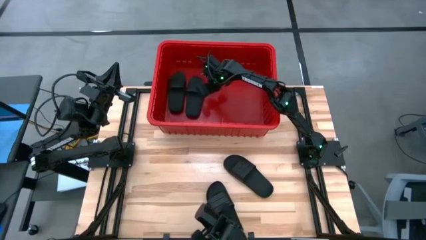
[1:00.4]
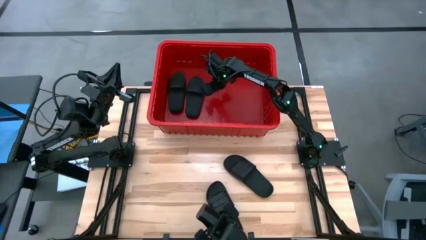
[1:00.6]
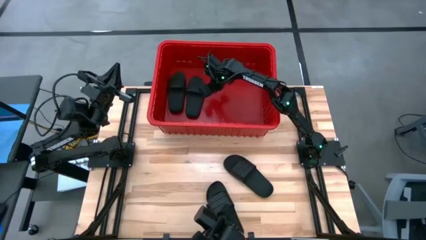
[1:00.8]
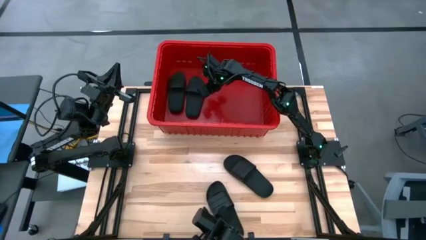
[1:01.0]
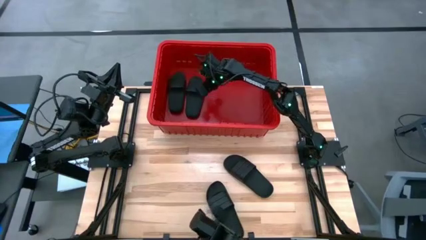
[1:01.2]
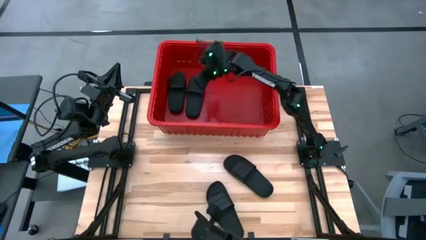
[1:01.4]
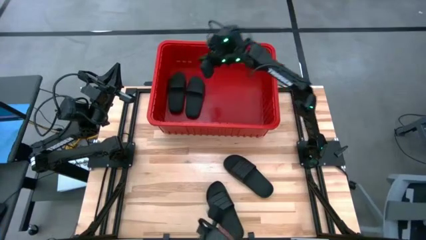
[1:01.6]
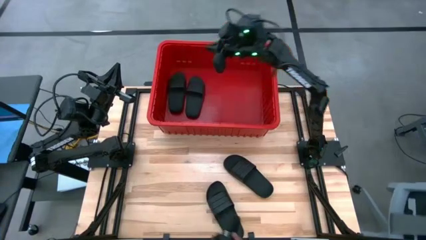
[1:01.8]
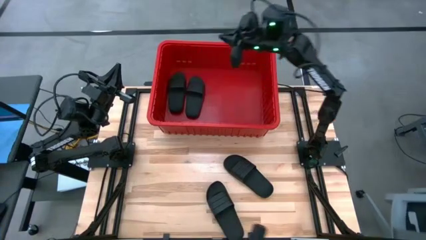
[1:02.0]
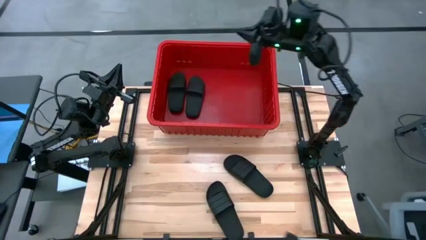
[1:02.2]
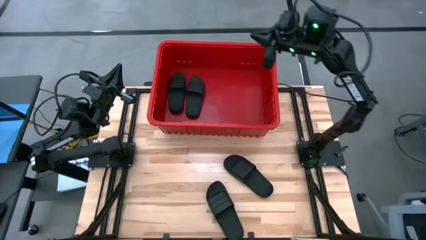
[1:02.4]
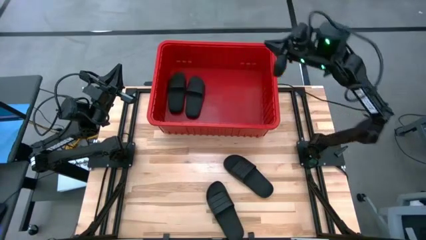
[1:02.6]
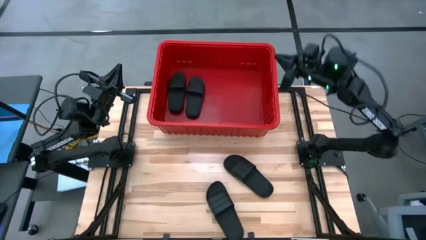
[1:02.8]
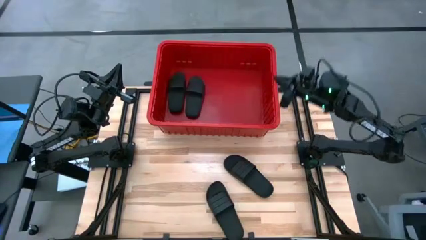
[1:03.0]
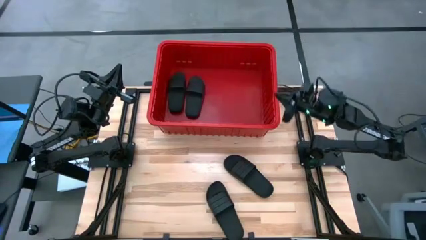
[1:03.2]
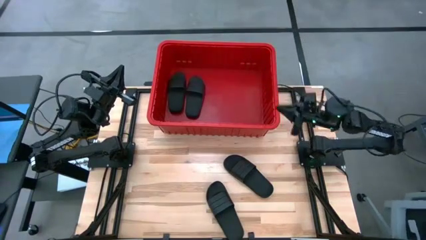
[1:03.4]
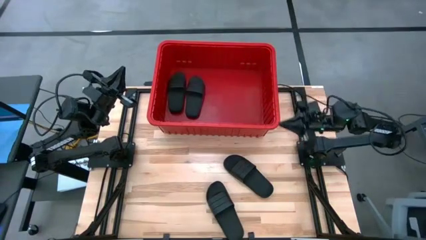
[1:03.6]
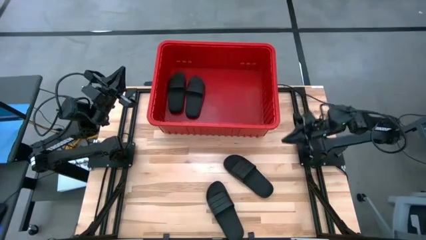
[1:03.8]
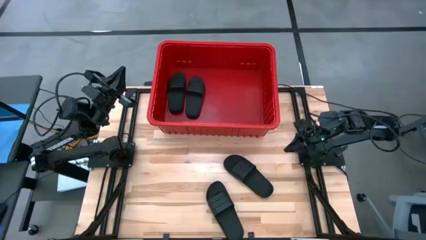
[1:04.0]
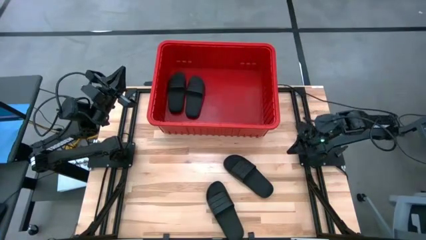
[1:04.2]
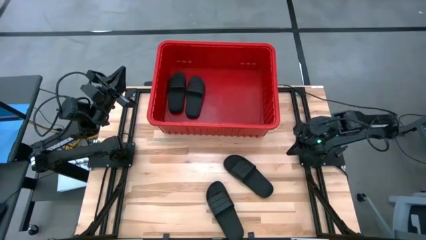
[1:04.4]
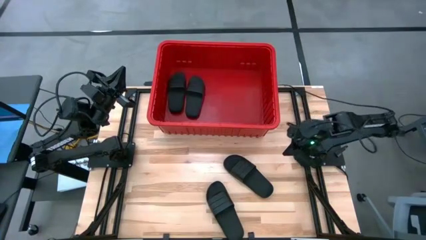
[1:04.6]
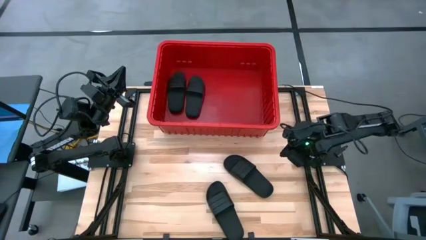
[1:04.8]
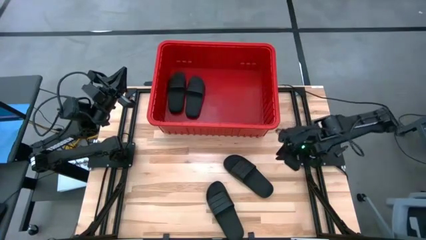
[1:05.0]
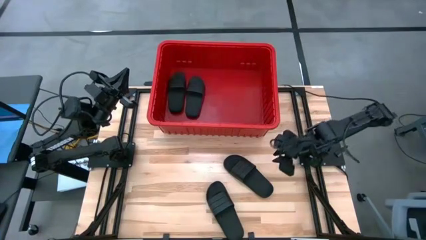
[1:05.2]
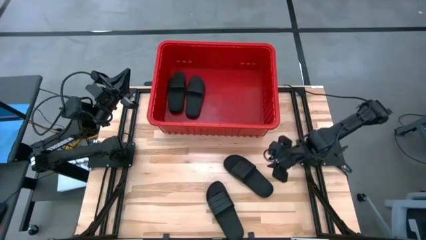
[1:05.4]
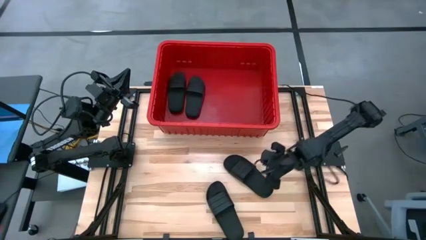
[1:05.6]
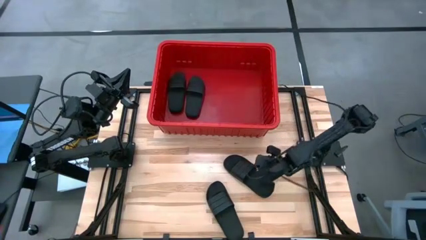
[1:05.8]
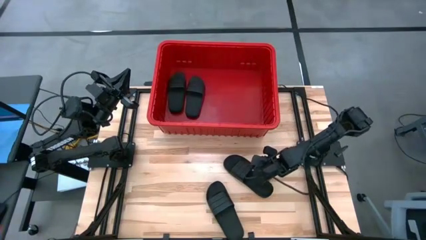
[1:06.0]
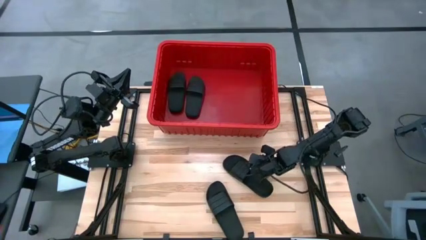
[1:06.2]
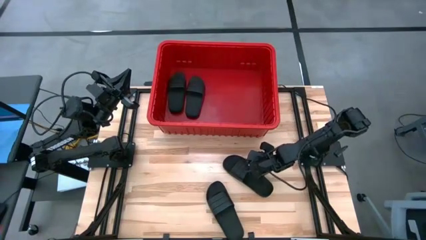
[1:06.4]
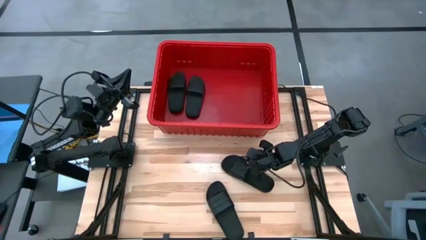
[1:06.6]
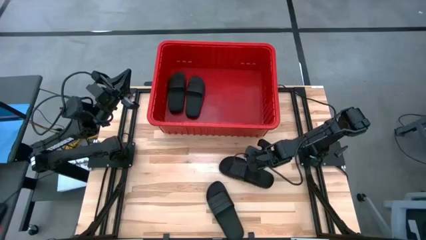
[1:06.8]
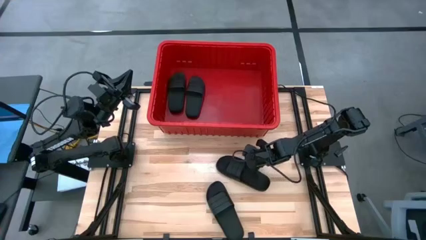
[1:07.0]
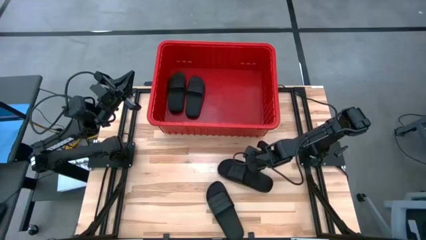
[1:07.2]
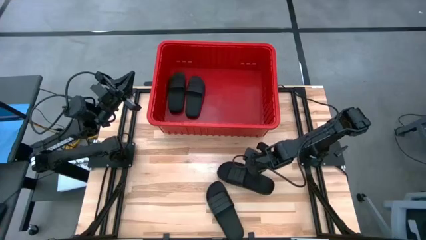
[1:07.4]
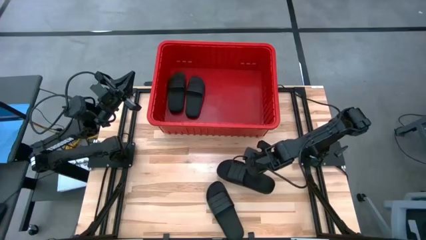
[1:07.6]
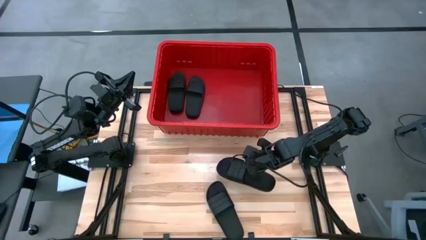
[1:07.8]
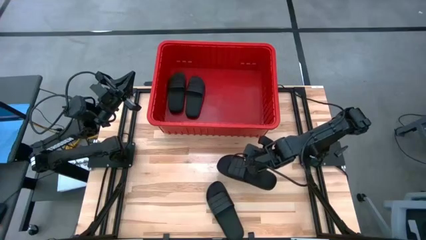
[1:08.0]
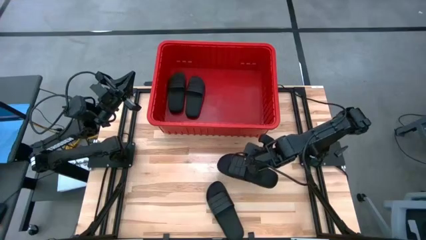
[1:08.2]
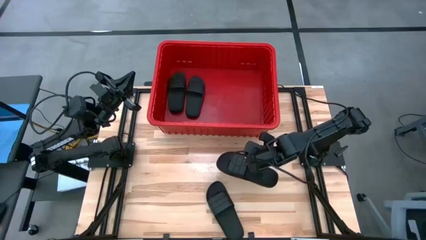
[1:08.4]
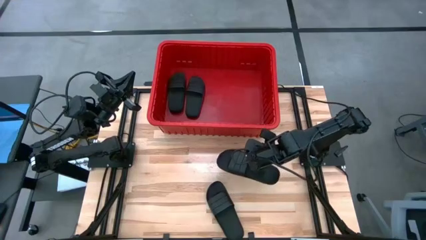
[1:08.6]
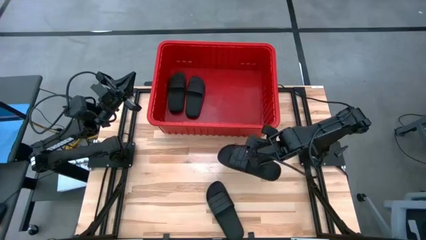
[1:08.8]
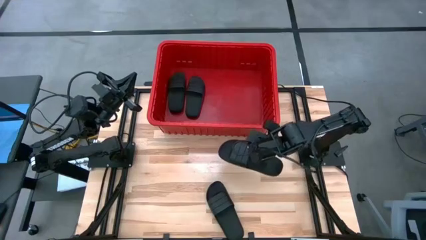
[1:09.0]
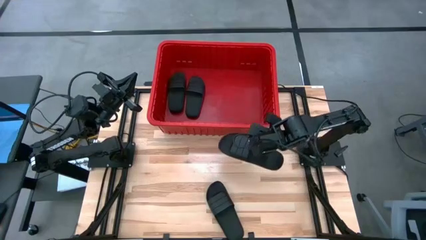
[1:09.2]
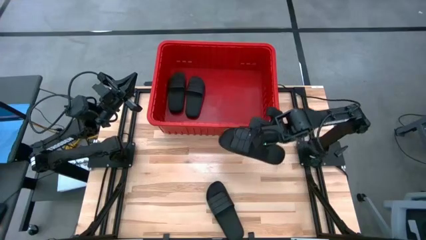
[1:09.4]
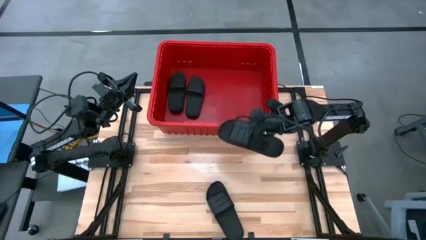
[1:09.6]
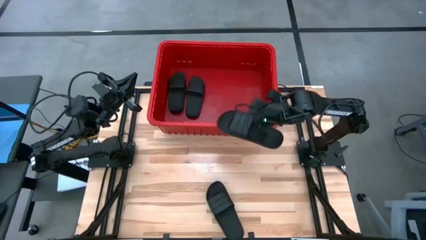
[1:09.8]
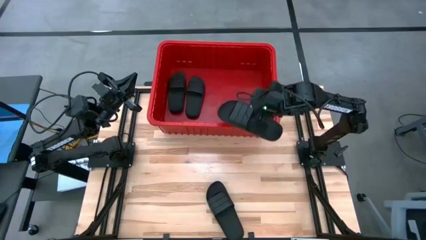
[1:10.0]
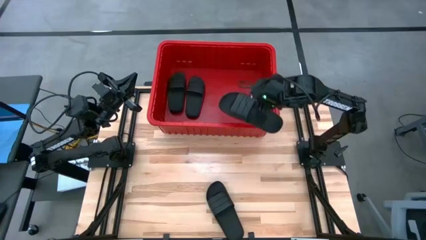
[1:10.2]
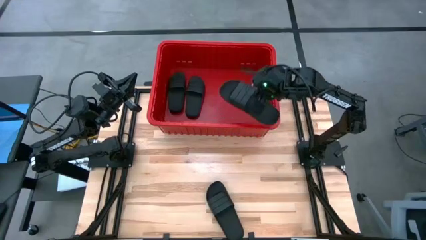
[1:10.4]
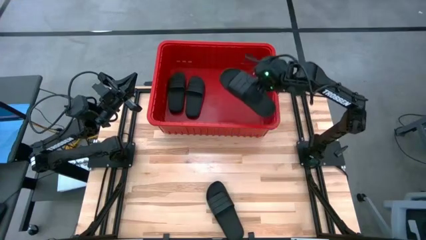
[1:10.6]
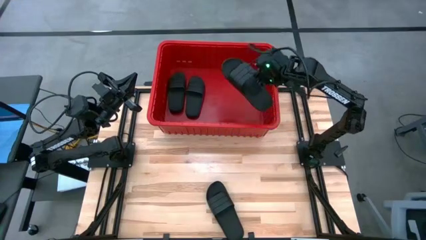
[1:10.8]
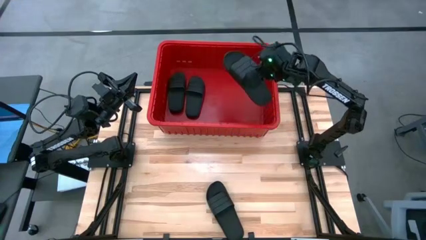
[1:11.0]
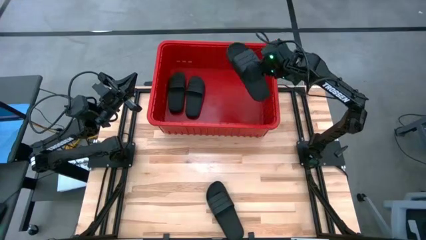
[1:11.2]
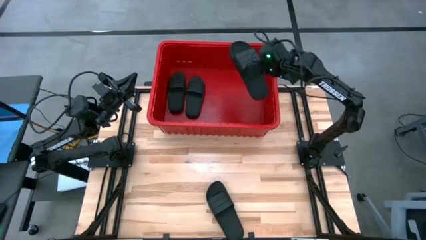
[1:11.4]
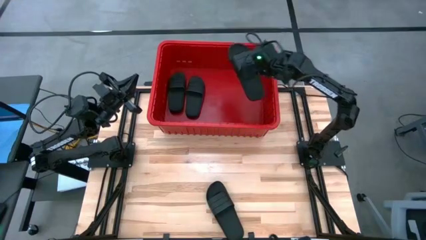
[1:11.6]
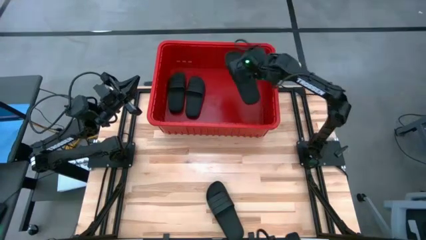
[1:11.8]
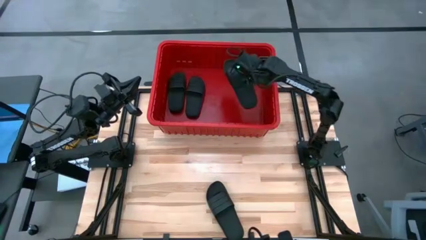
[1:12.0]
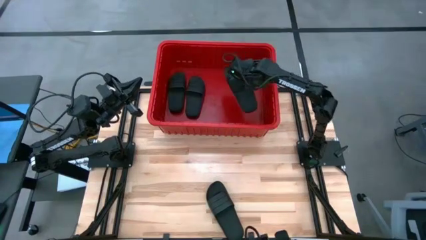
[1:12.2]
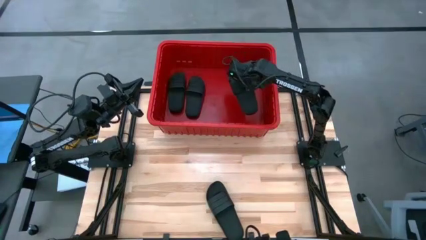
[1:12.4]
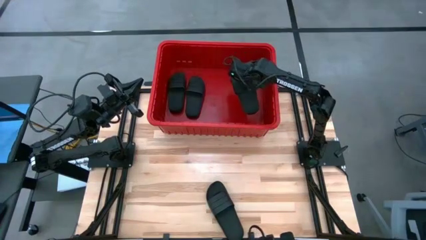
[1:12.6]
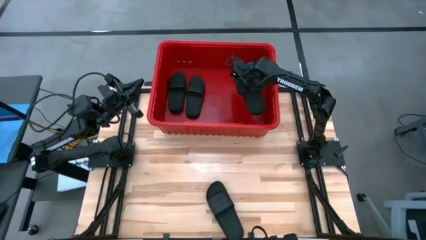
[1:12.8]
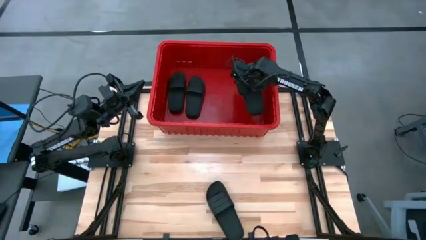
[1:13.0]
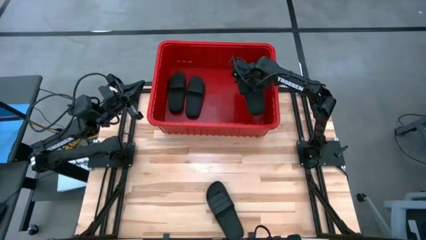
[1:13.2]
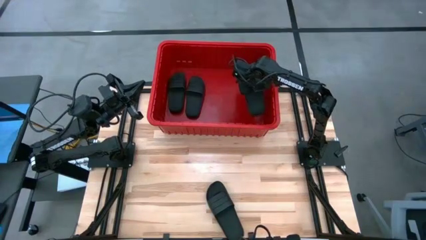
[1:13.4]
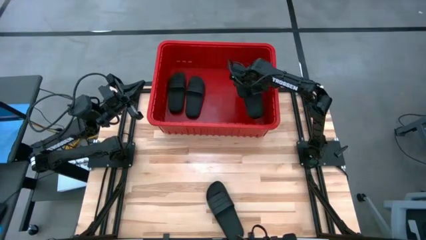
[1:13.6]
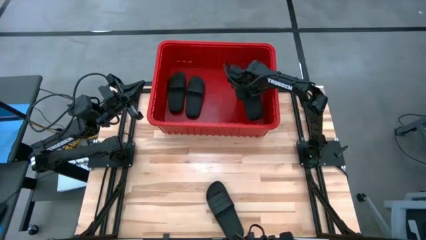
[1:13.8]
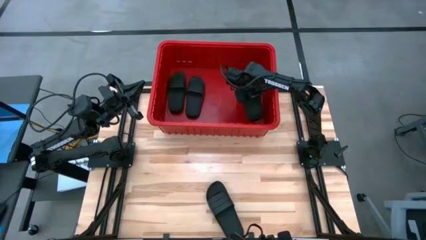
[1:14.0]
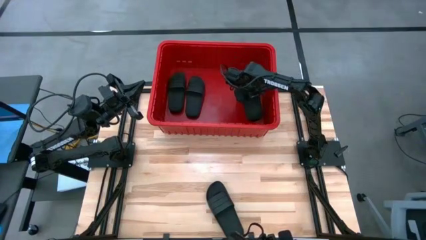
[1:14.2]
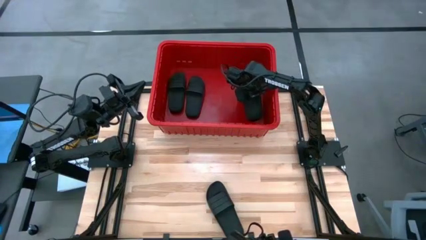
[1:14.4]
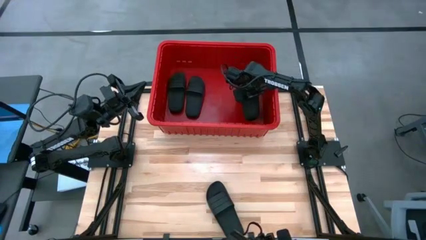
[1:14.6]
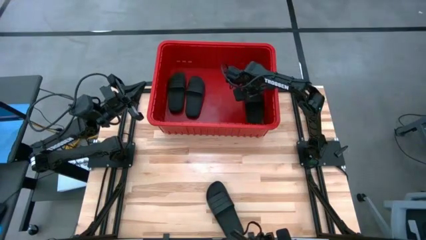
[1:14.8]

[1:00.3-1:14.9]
Task: Pick and place slides into bin
Put the top slipper into the organizer bin

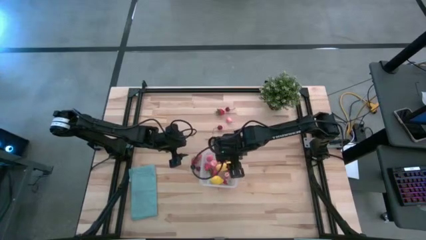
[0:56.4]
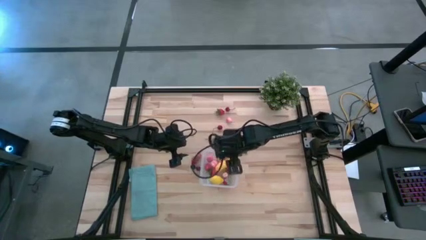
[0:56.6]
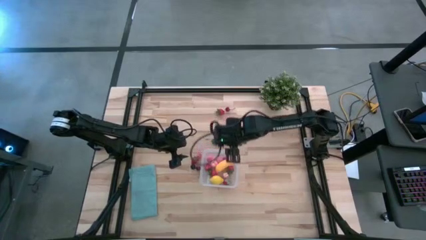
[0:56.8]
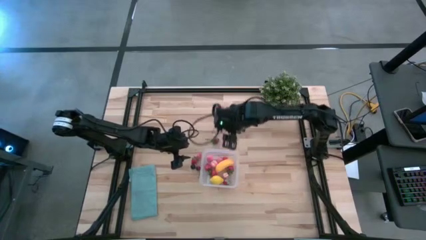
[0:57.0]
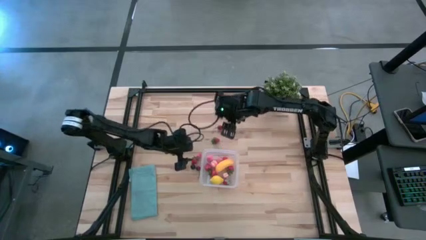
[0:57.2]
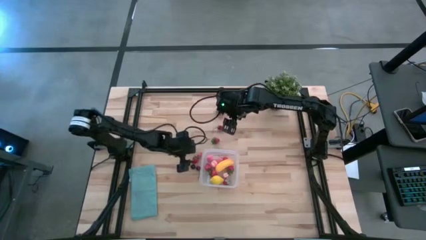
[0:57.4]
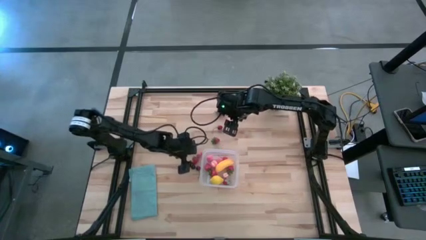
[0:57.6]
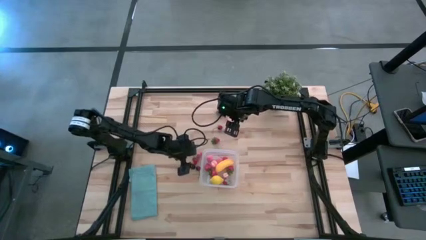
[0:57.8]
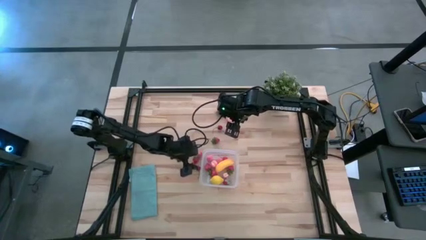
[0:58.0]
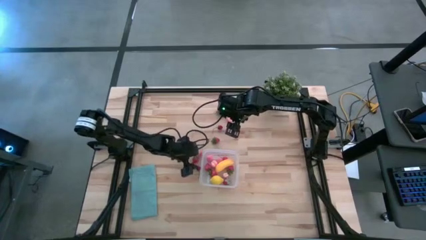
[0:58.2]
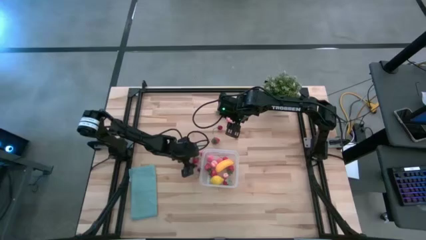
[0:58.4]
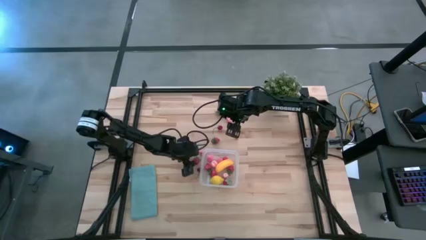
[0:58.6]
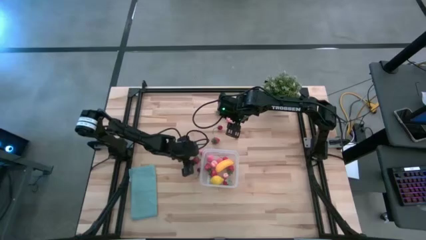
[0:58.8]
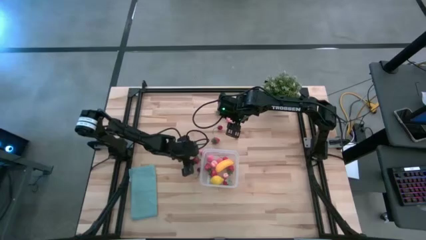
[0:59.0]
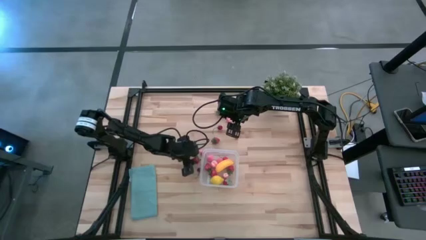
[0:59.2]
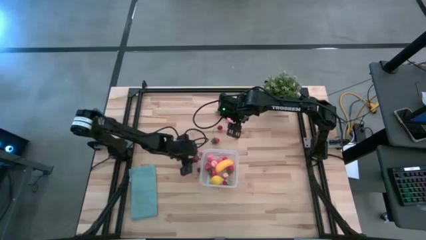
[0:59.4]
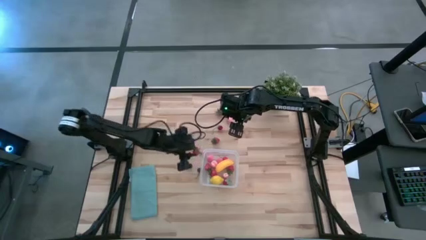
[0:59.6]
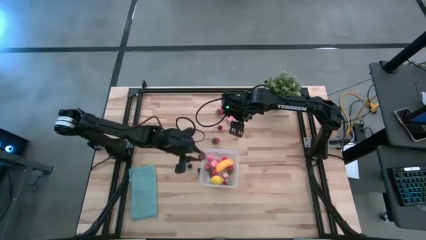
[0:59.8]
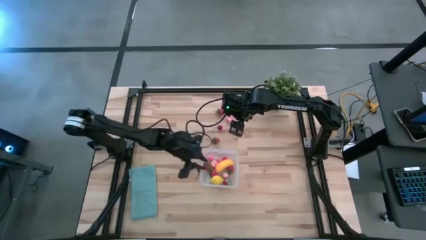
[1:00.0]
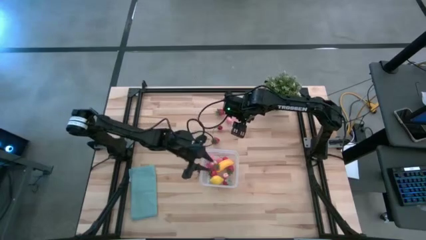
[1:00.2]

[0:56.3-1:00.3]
Task: Pick and placing Produce into tupperware
Put the red strawberry into the transparent container
